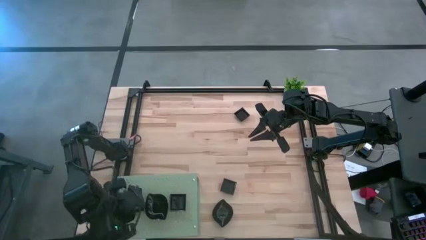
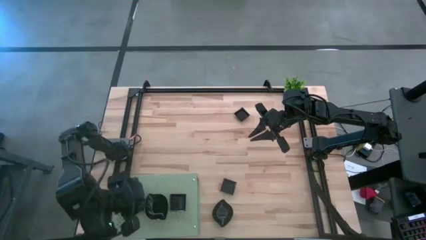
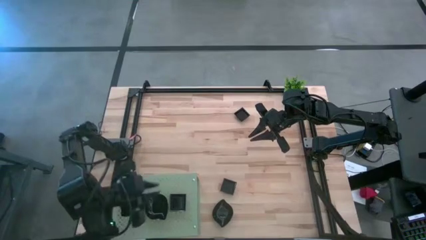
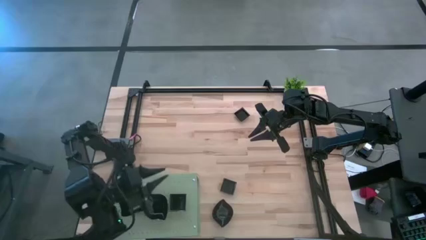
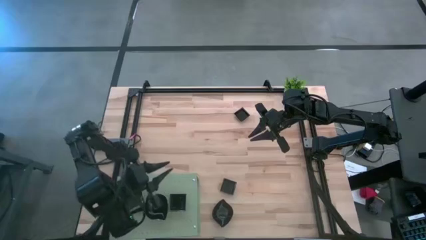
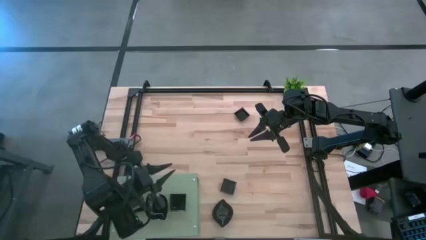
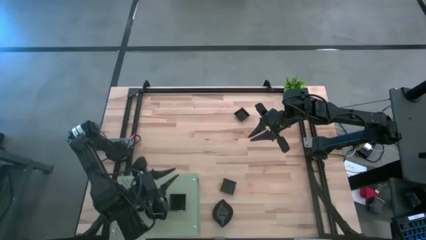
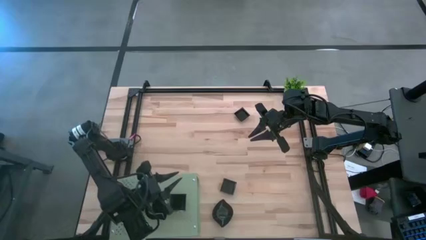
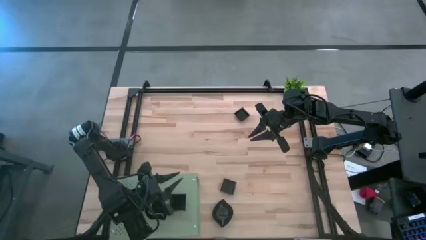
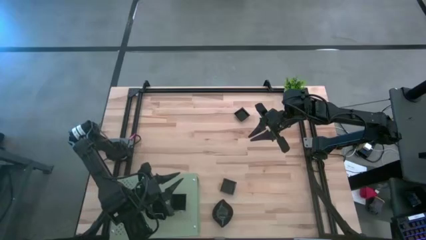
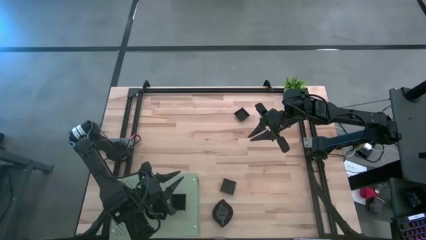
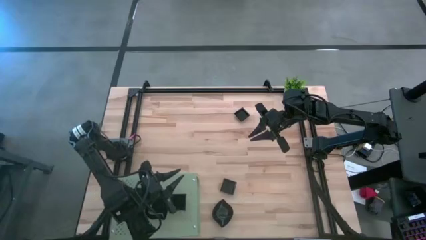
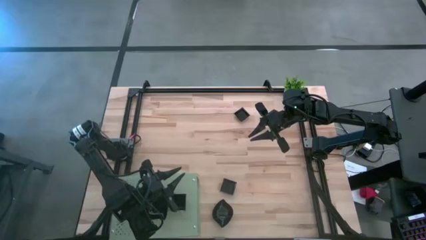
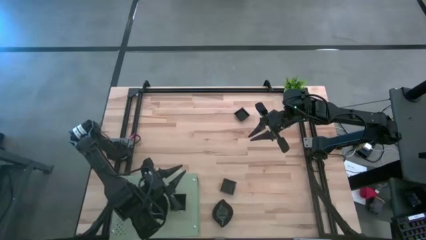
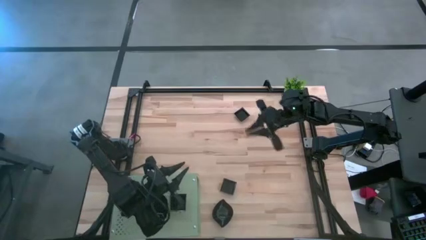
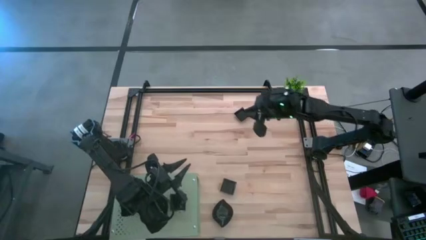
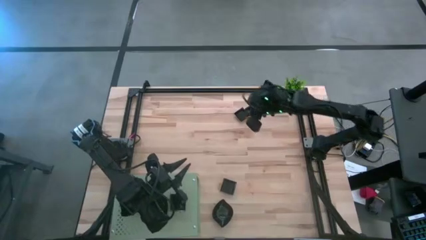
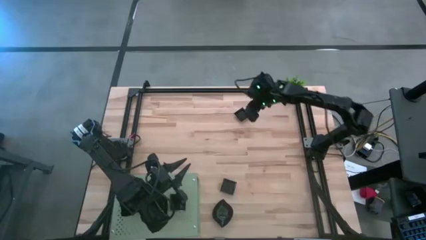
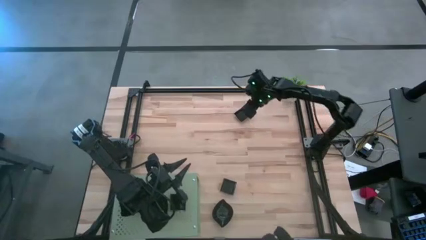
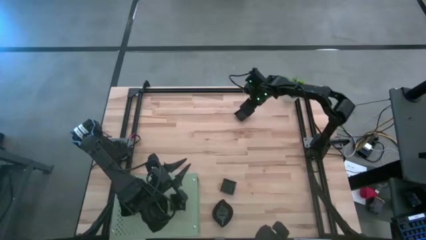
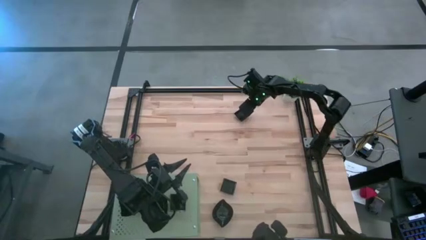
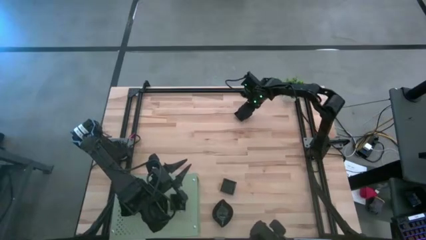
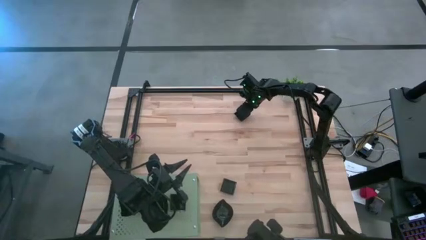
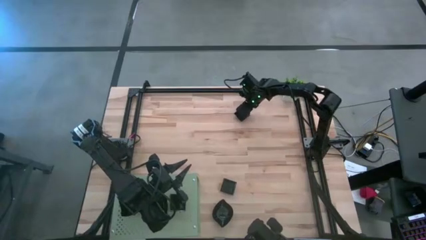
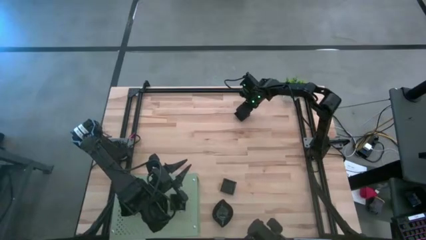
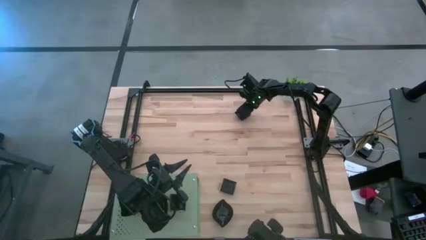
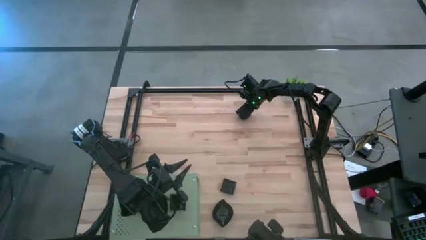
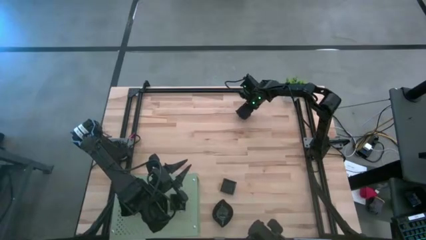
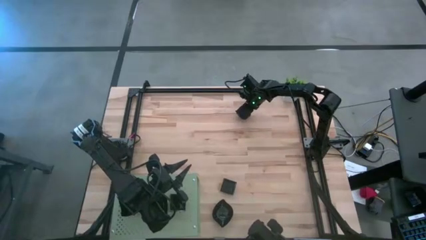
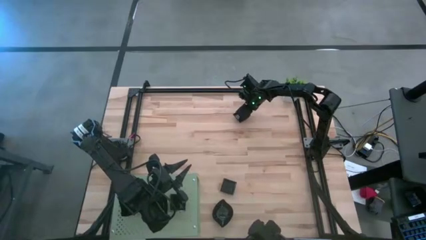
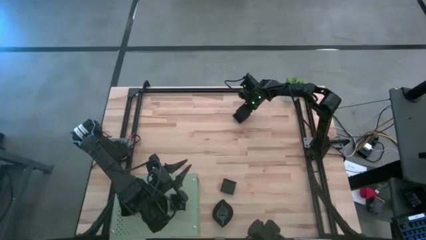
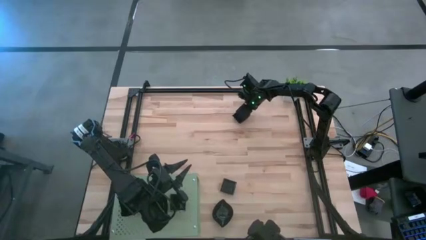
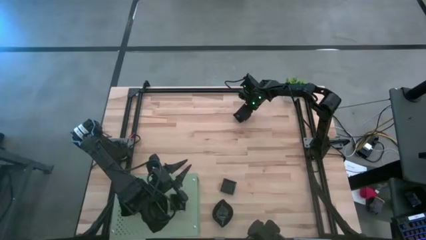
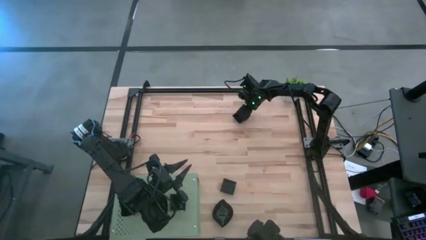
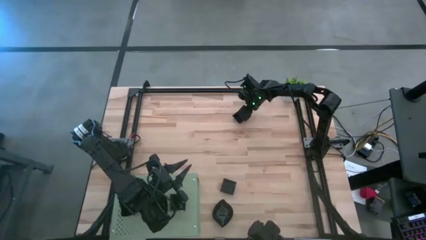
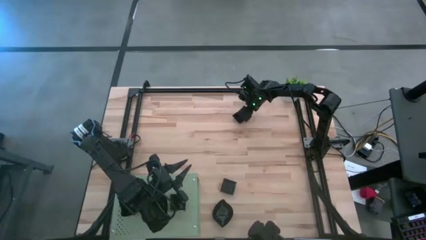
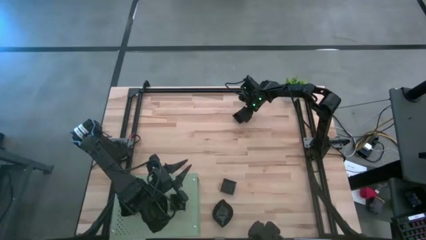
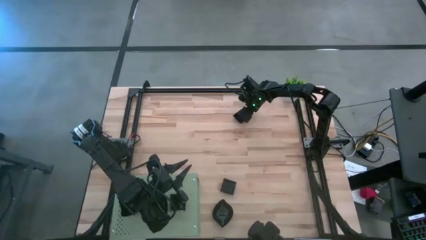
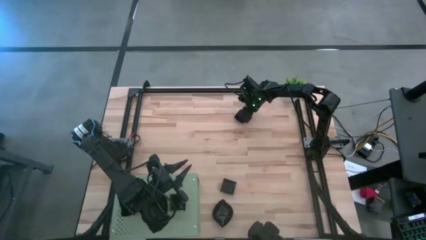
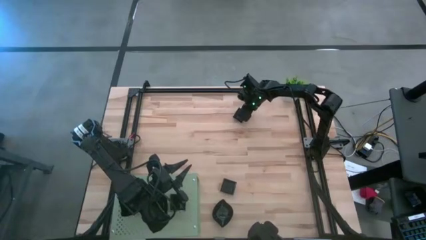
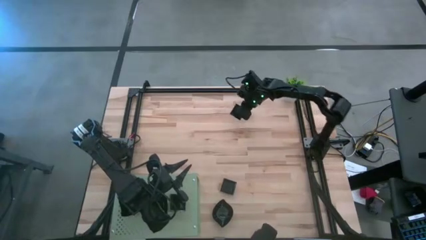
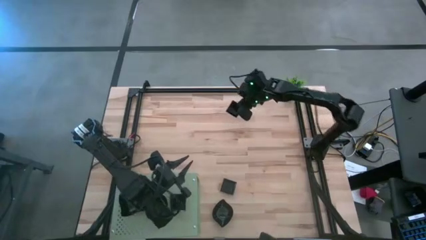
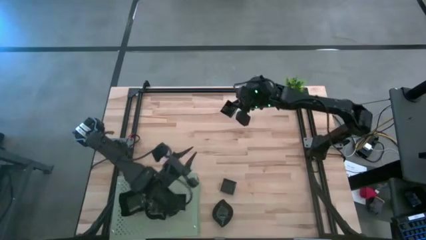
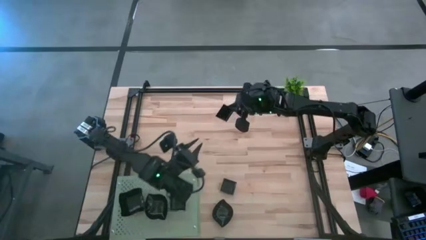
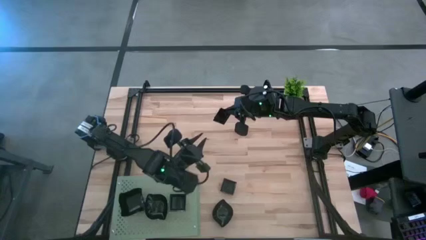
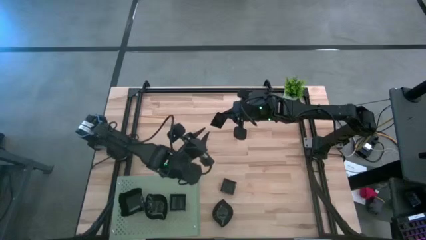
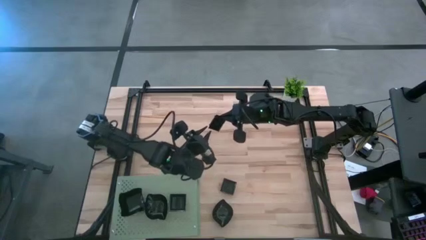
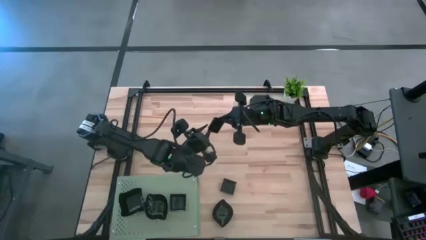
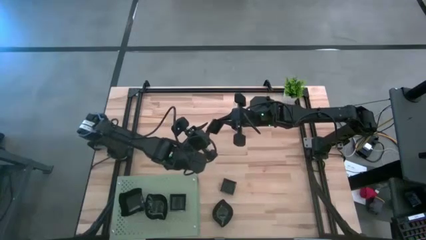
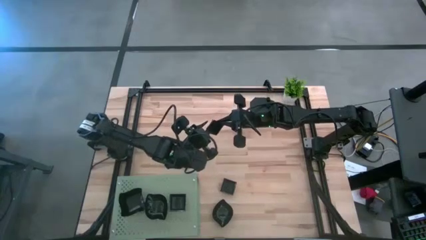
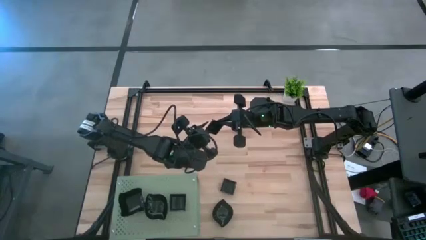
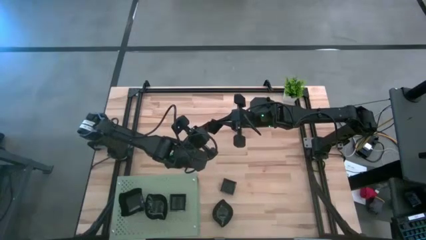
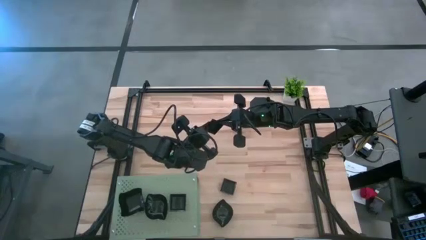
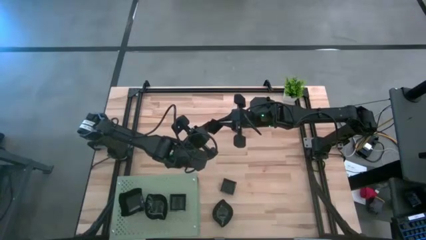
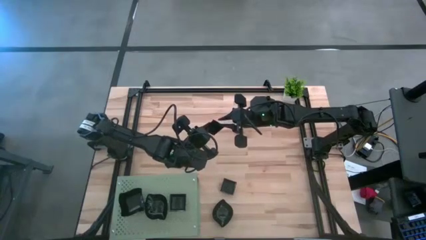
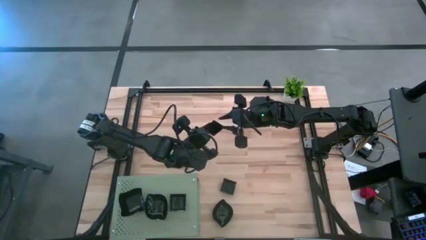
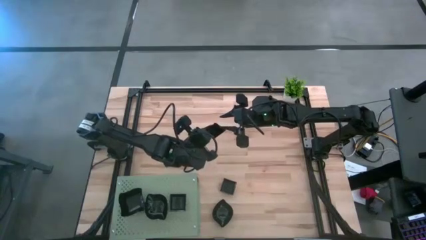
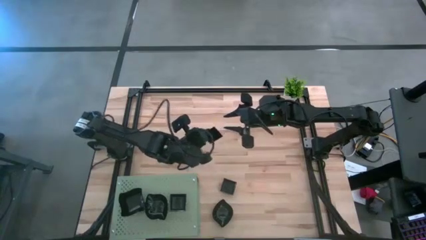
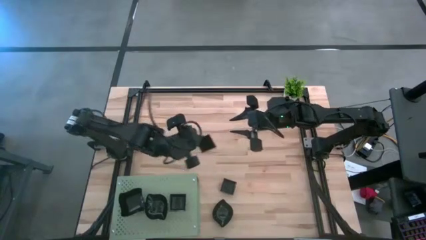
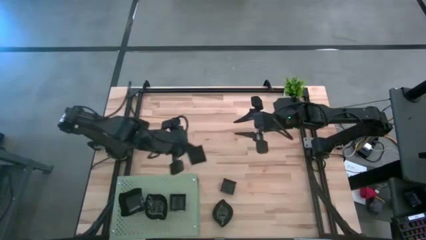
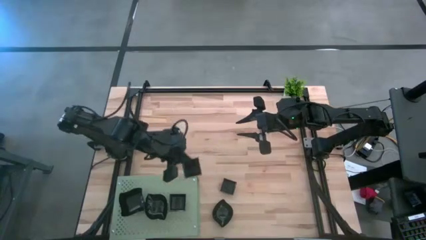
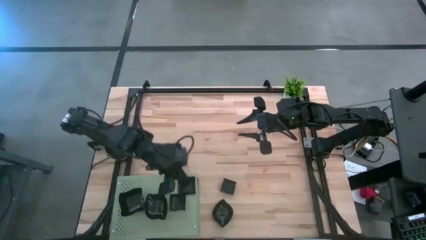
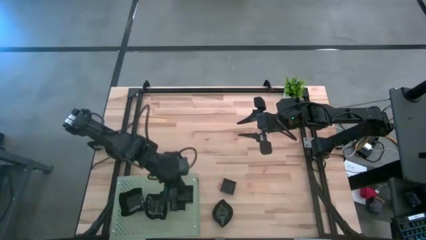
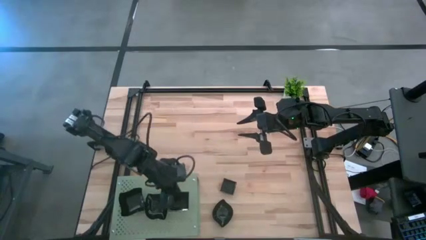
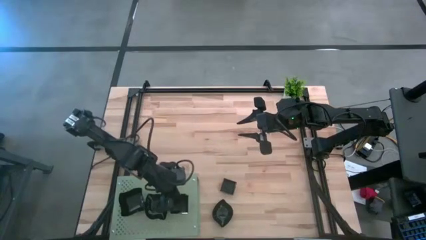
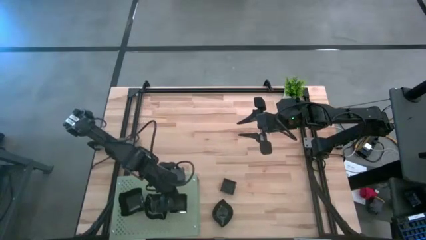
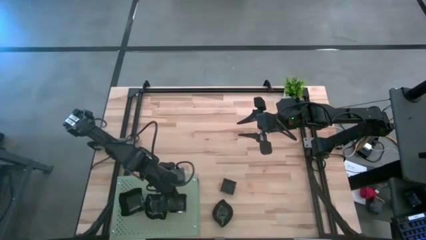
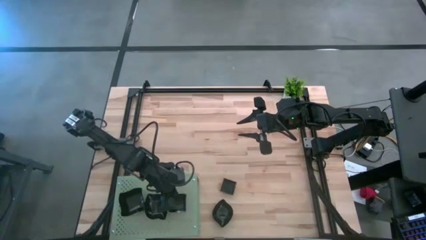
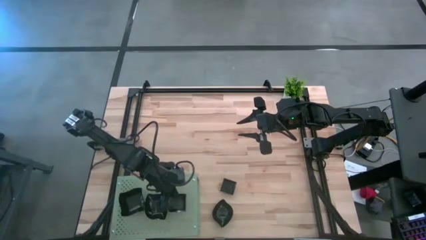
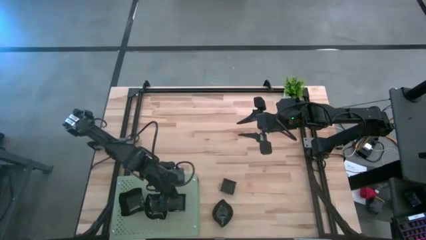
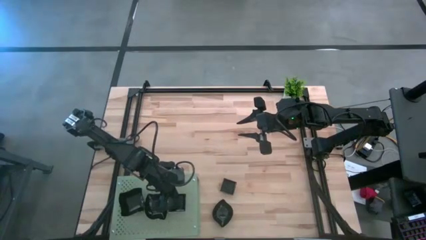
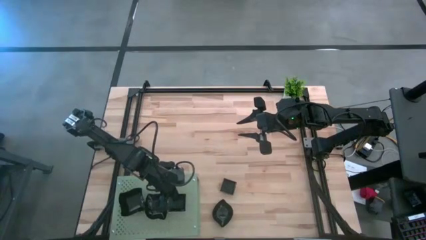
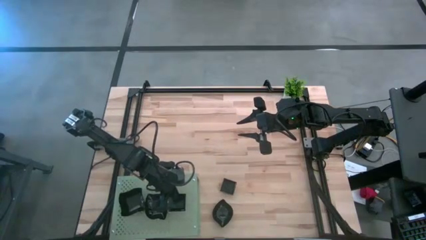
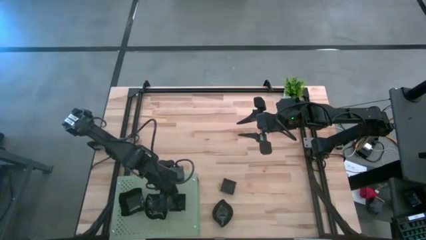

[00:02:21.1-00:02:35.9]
Task: Pick & Place Mini shaped plates
Stack the black square plate on top of the other black square plate on the shelf

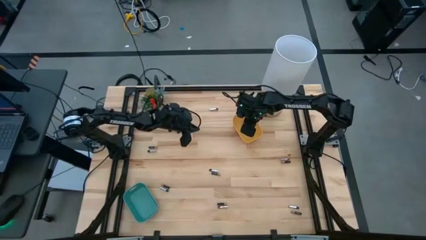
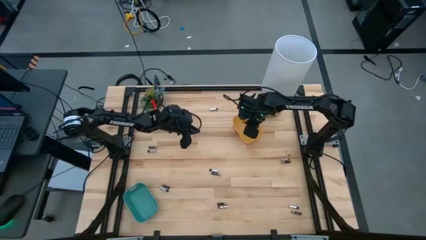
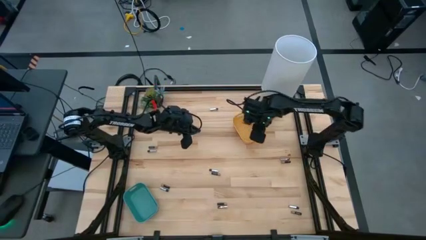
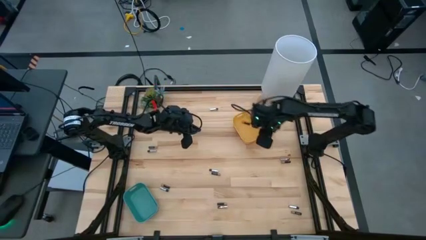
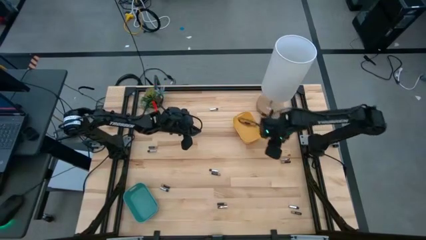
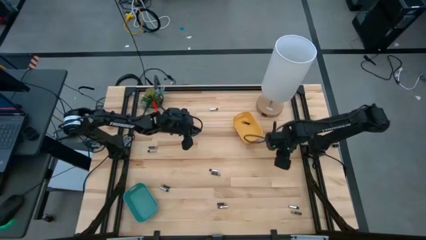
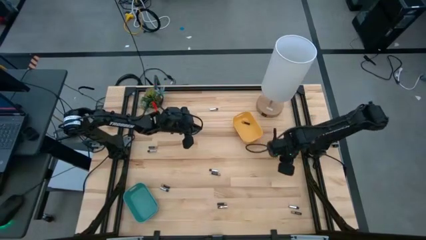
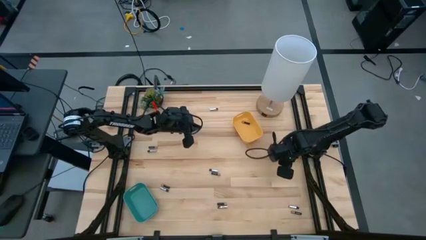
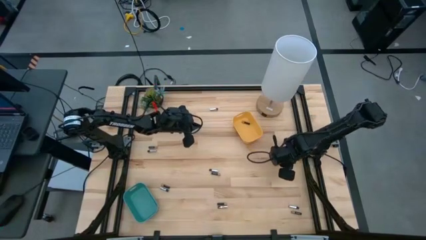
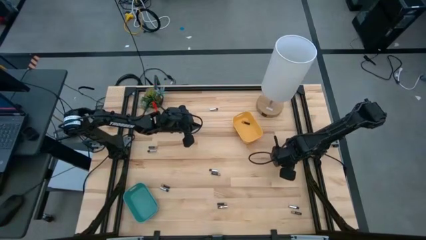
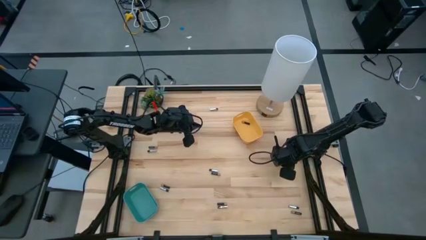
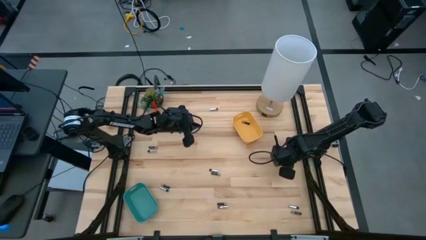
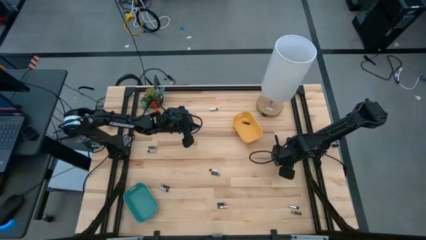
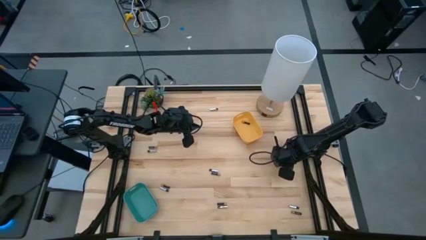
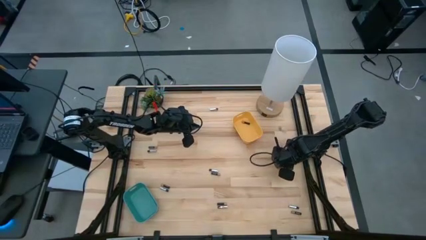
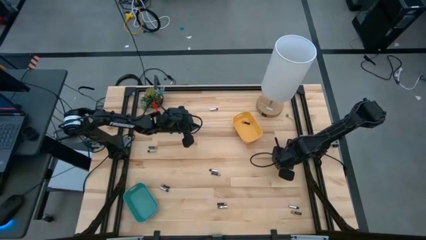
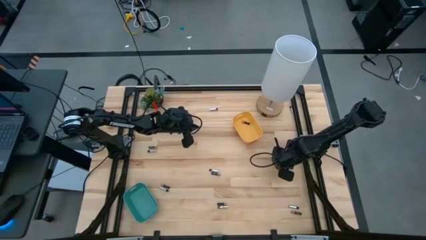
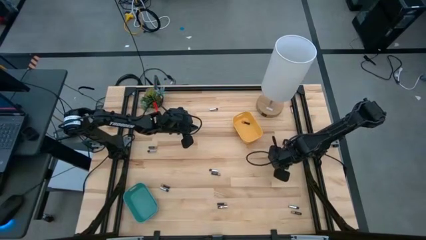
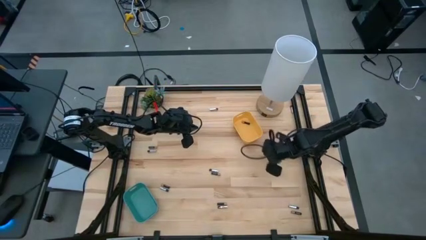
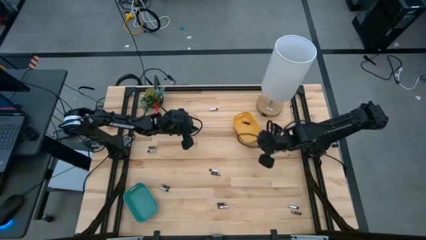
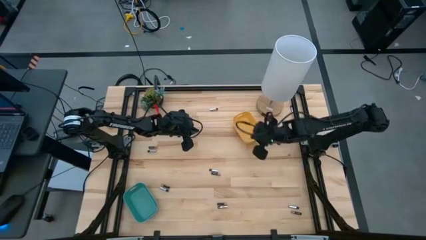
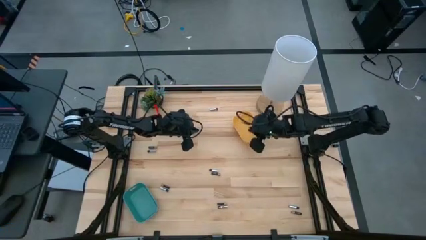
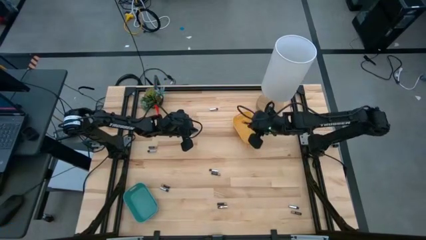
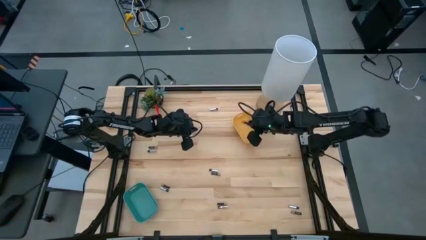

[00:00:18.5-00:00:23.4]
Task: Sort batteries
Put the black battery into the yellow bin
